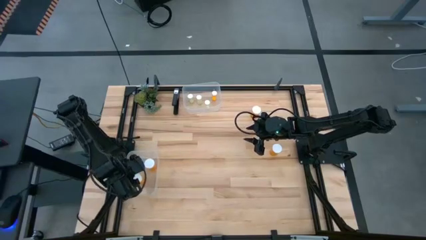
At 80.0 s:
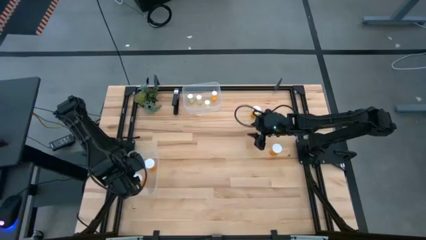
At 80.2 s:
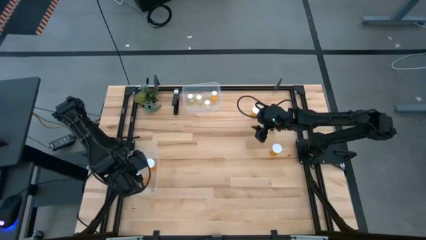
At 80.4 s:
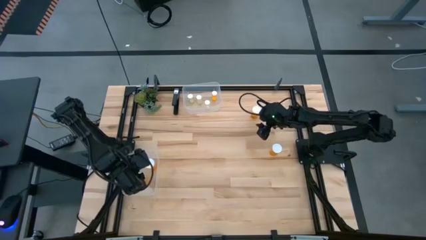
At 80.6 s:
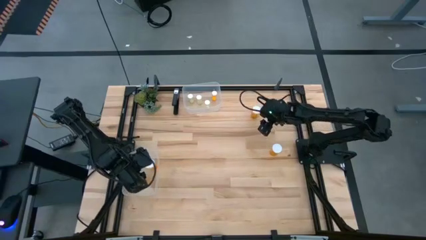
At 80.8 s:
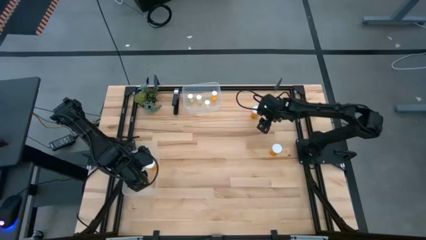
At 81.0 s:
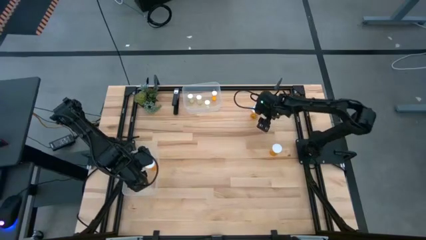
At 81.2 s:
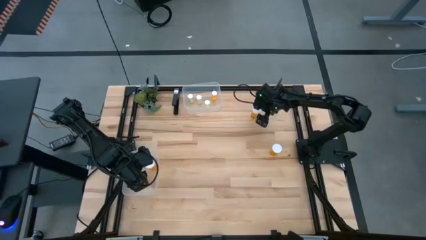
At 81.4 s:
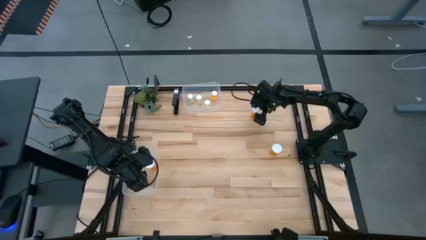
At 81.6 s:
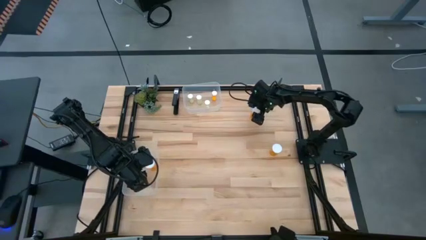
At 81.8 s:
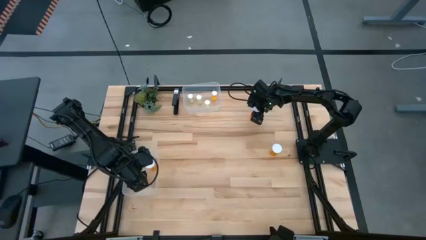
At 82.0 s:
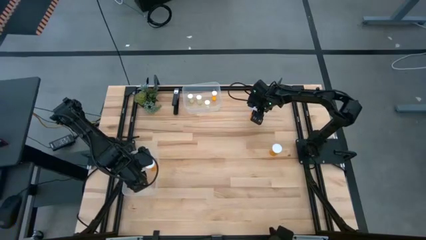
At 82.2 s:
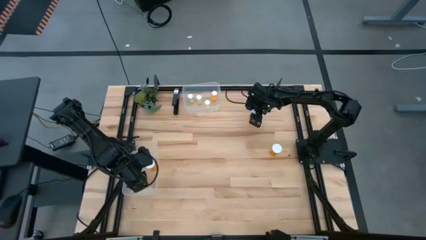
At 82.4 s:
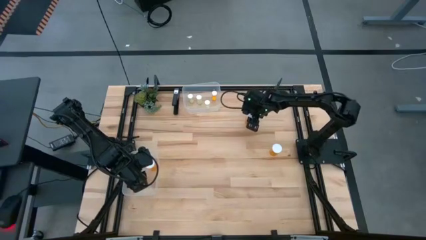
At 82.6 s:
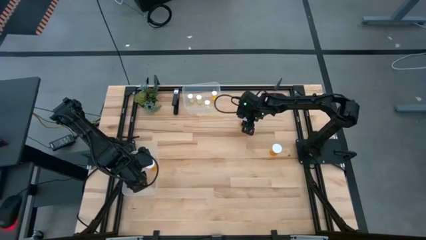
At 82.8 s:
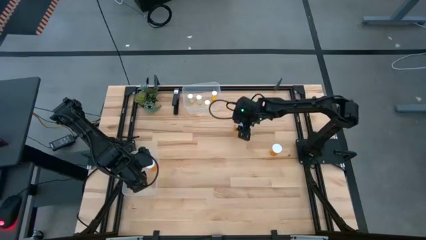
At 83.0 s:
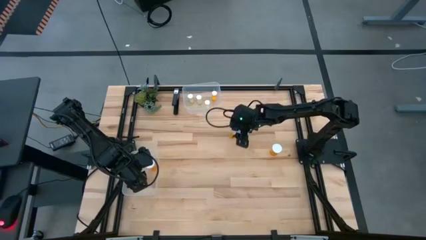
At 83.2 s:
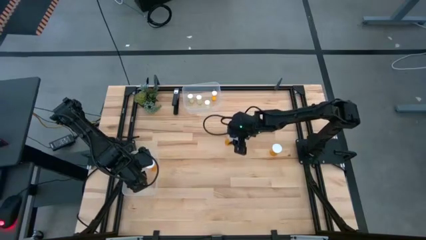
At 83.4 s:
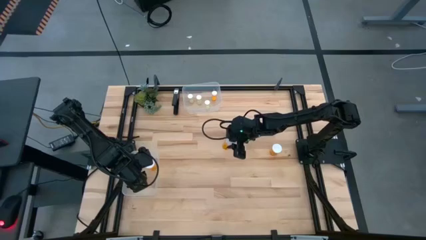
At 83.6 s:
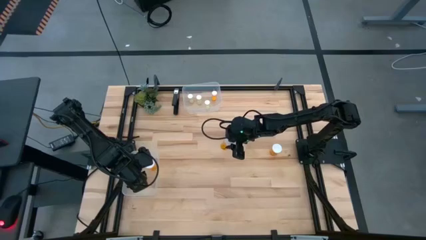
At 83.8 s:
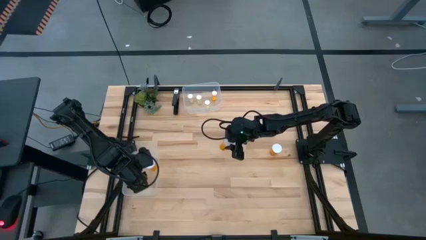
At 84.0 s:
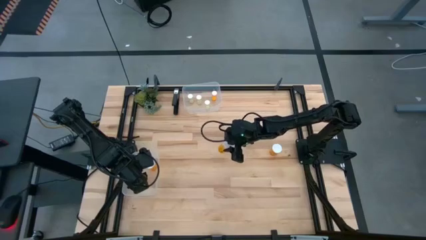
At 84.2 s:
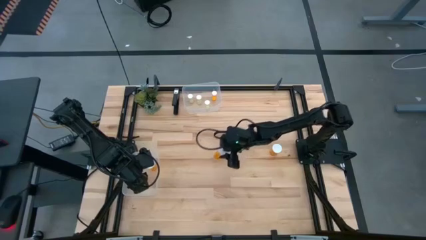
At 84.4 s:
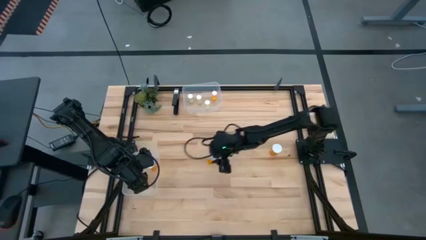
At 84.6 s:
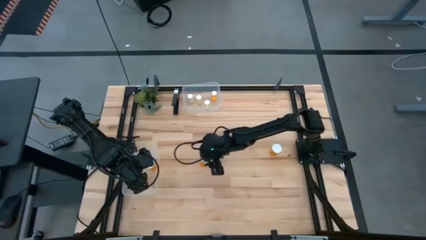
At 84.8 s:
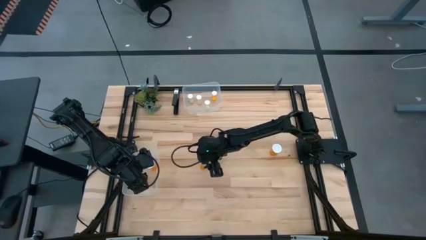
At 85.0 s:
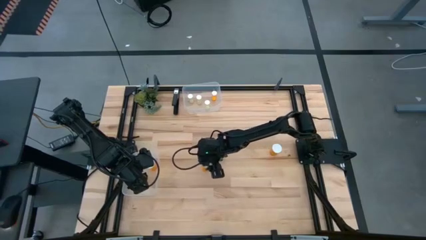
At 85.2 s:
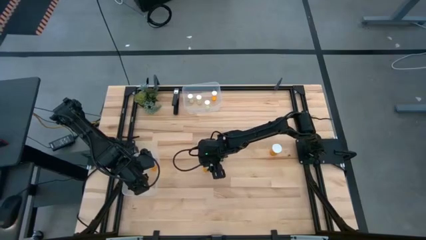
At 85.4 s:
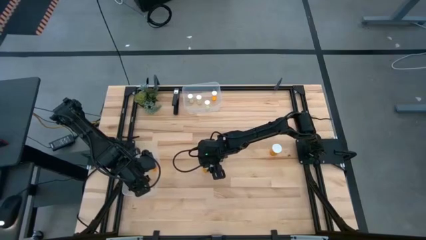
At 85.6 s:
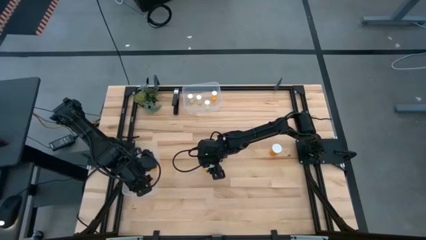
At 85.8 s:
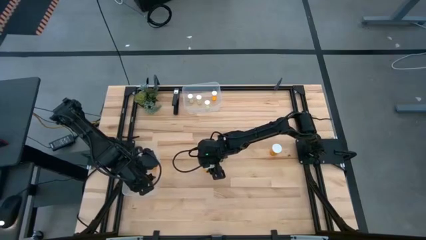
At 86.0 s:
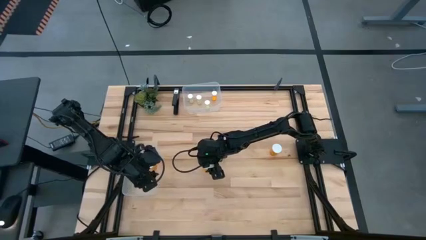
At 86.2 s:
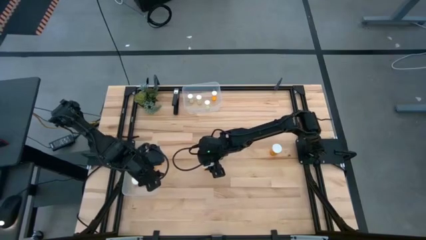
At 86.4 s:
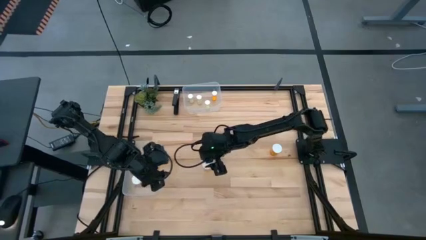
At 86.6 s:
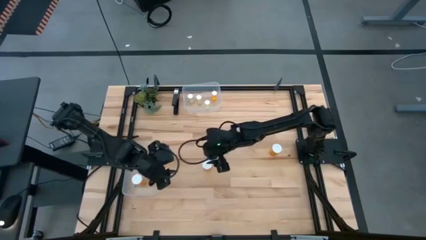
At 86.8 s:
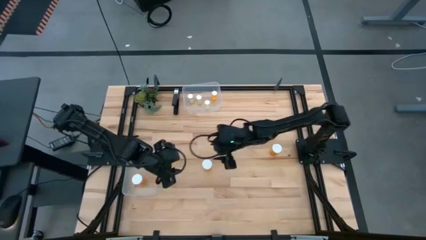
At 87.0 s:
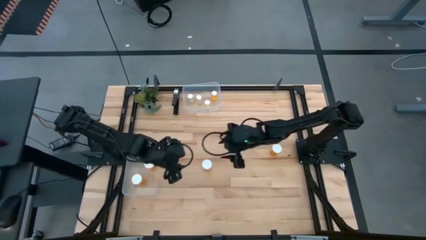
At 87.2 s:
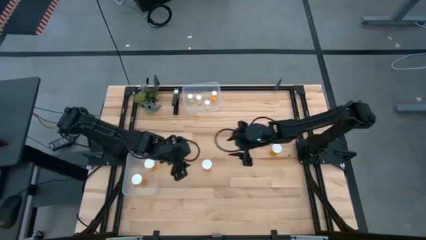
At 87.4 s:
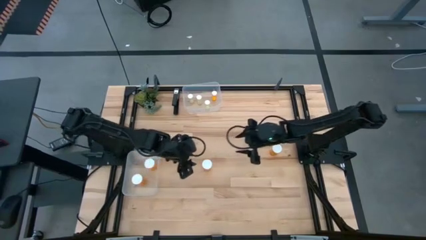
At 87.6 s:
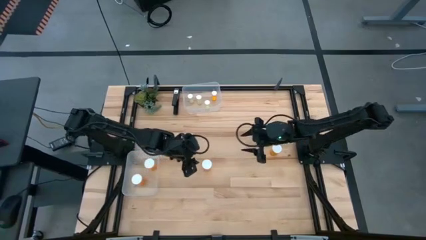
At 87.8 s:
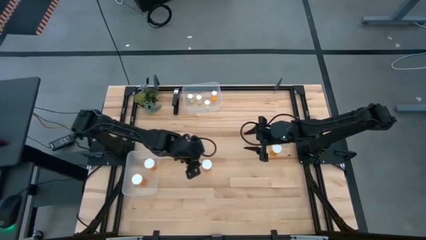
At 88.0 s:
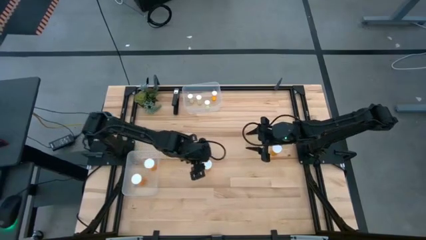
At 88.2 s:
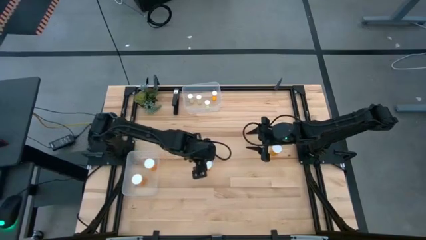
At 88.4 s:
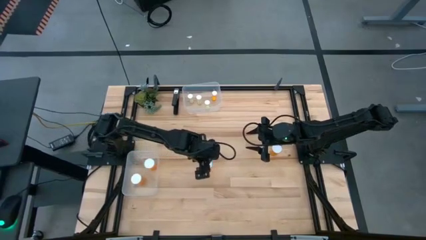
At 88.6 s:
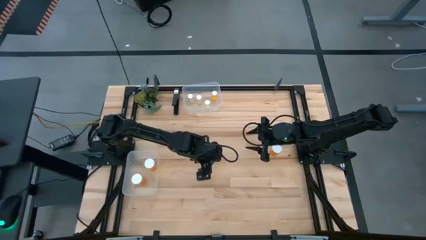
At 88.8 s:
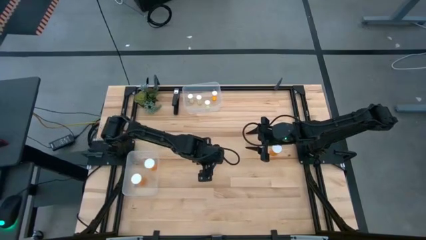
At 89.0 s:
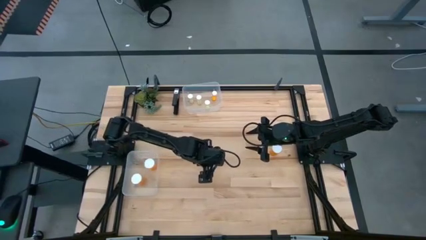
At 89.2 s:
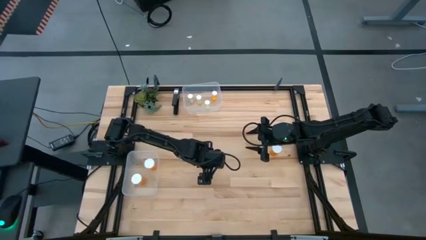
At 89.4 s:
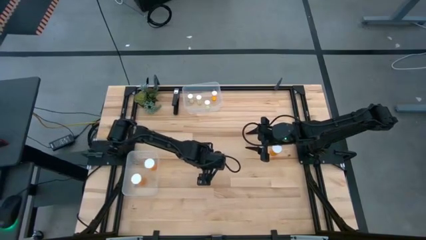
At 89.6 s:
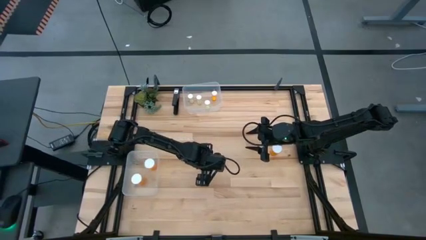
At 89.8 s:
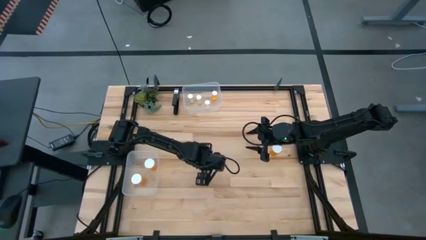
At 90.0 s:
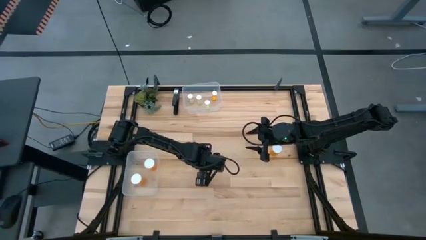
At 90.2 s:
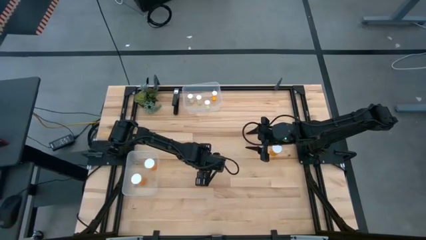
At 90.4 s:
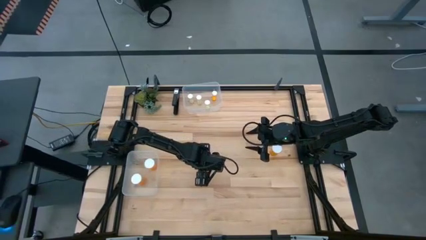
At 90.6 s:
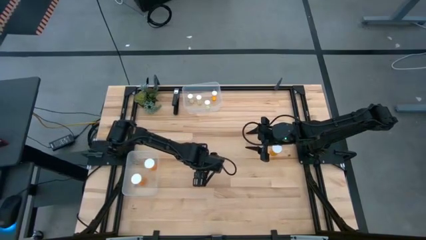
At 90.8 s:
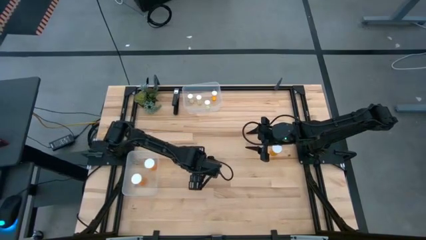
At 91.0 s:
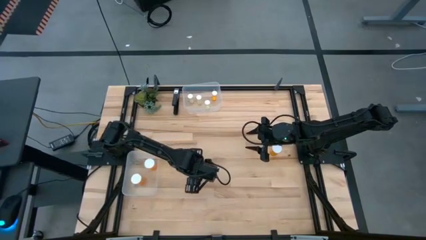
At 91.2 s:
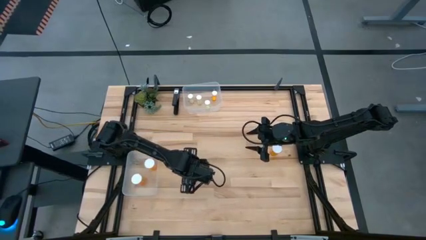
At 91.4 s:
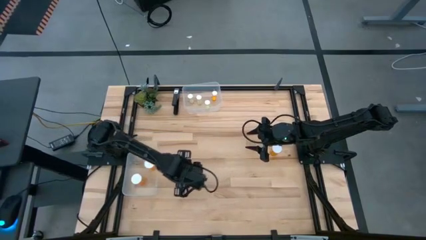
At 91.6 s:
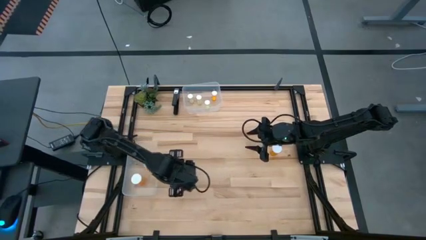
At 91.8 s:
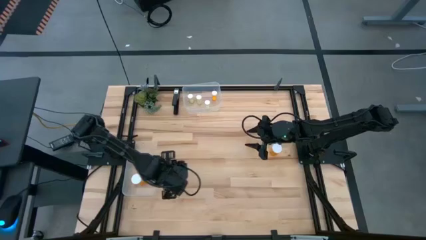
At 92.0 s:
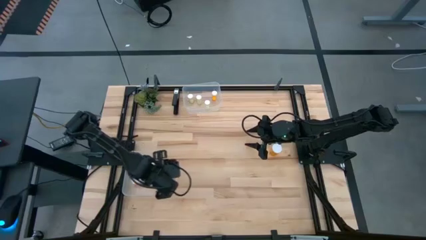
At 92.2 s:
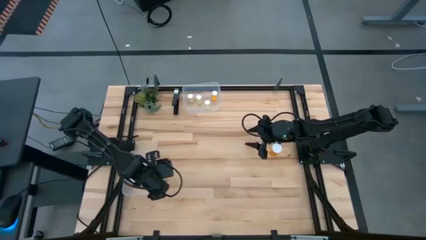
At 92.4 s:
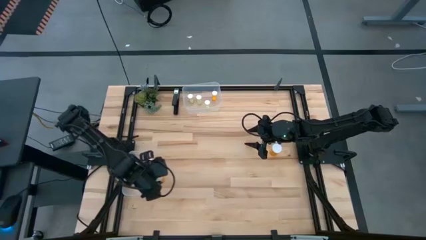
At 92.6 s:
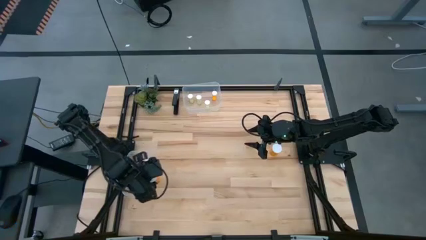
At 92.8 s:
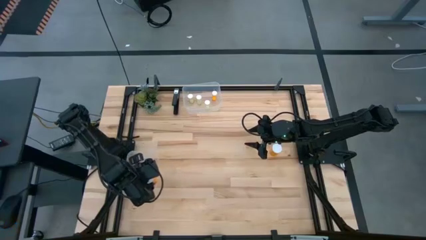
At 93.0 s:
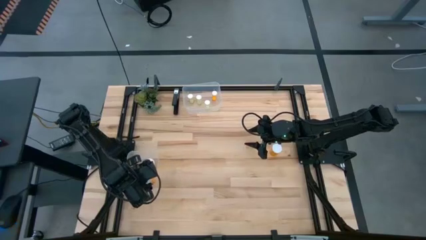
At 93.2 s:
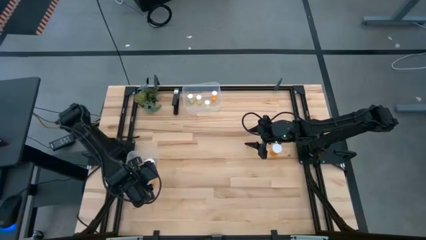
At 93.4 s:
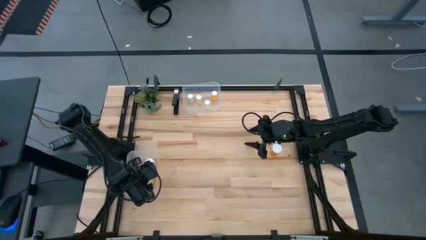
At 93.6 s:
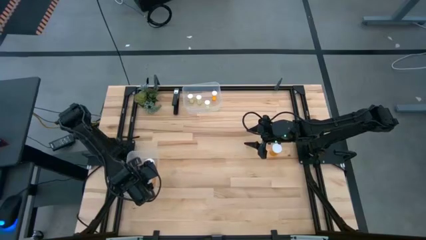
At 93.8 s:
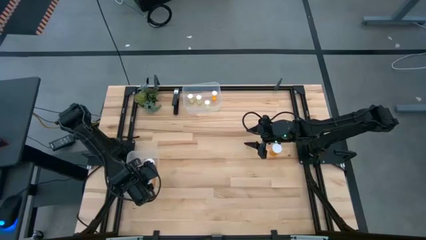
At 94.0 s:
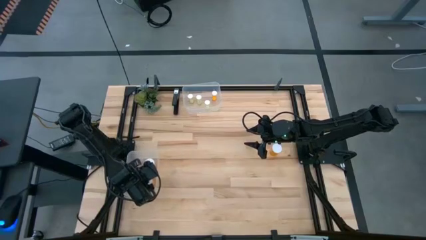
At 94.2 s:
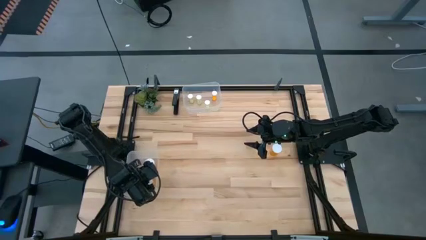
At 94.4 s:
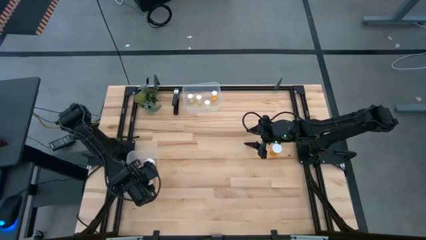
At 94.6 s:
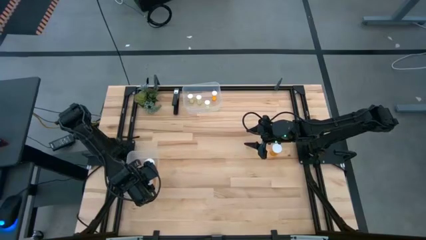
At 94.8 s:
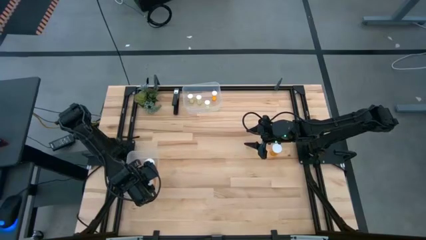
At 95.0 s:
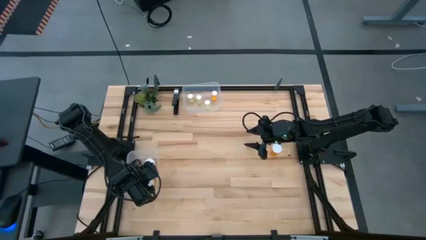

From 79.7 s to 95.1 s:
Task: Pick and place medicine bottles into bin by pill shape (circle, oval)
Put the top big orange pill bottle into the bottom transparent bin
